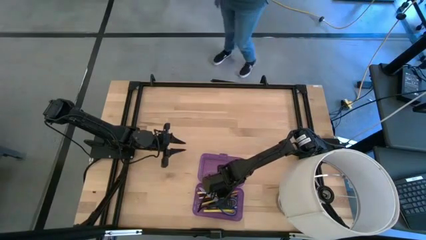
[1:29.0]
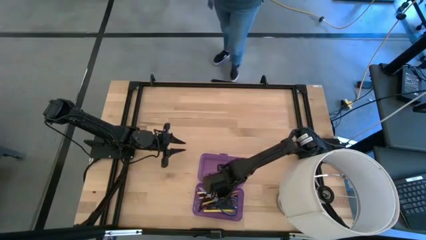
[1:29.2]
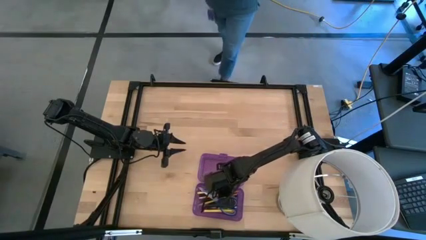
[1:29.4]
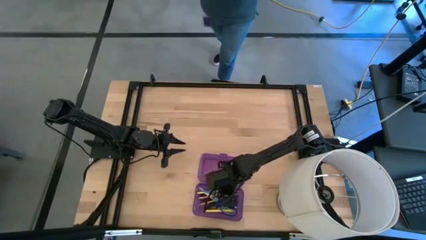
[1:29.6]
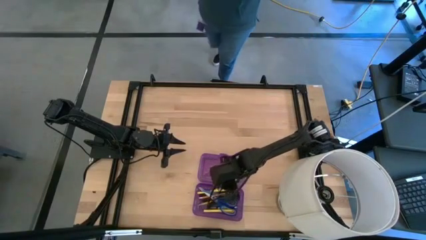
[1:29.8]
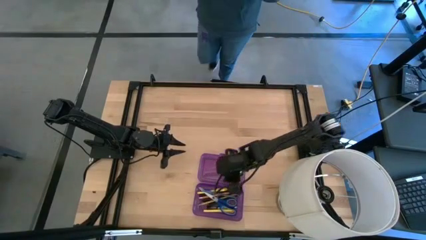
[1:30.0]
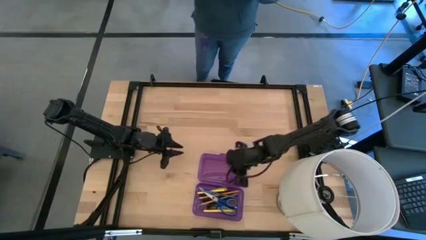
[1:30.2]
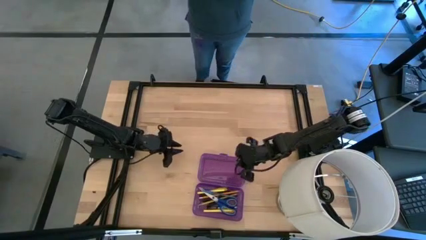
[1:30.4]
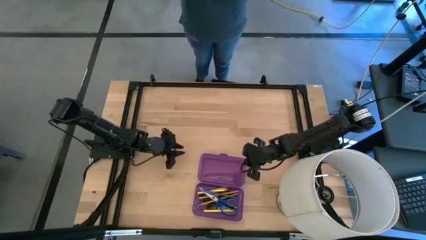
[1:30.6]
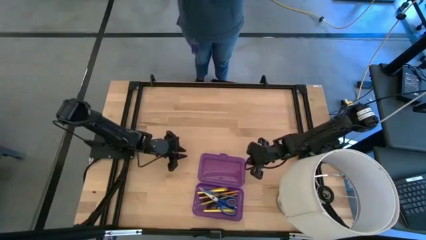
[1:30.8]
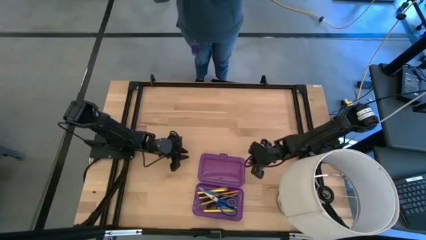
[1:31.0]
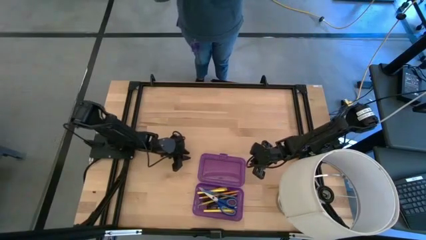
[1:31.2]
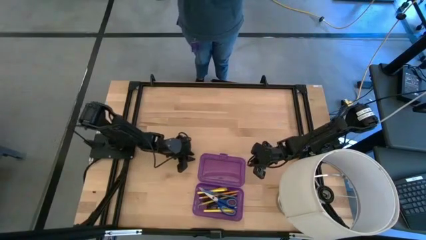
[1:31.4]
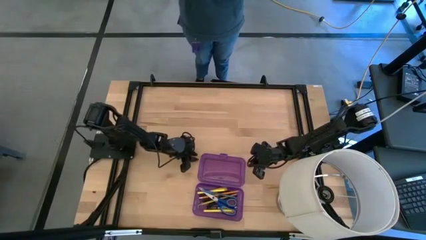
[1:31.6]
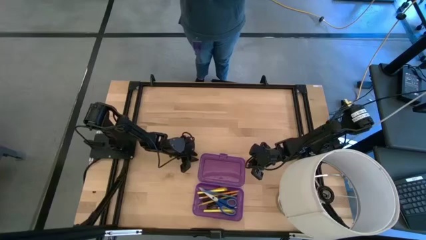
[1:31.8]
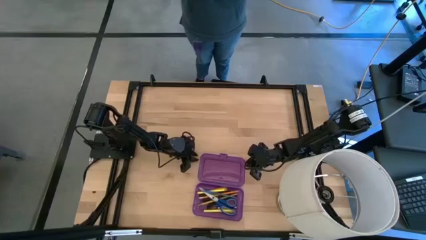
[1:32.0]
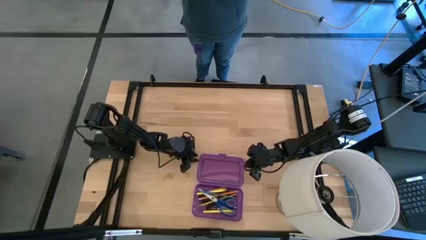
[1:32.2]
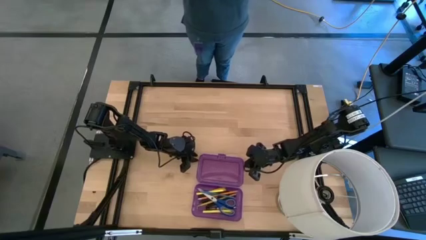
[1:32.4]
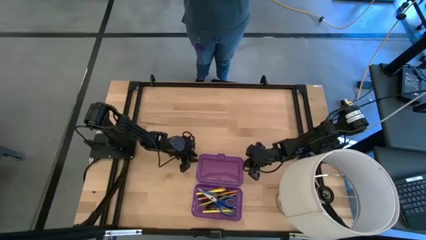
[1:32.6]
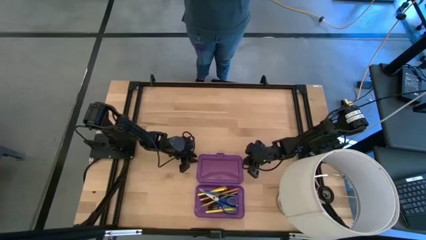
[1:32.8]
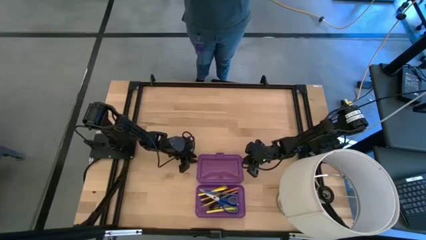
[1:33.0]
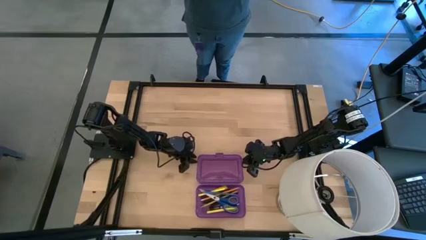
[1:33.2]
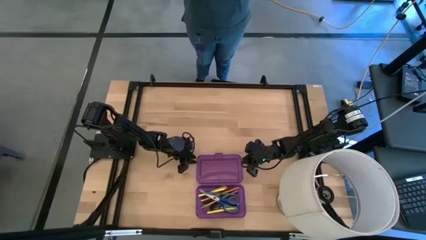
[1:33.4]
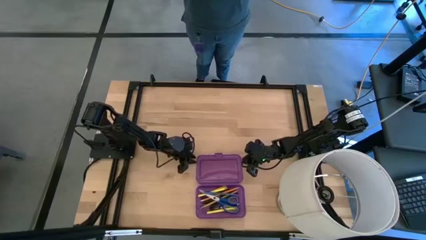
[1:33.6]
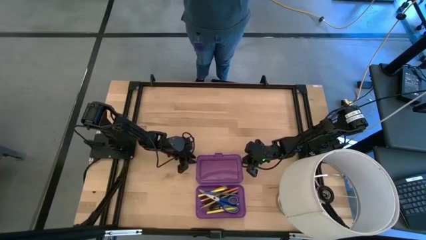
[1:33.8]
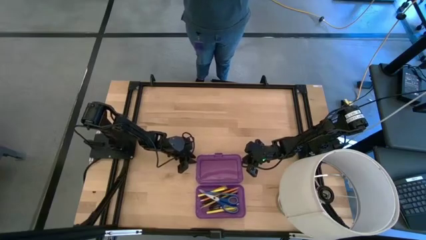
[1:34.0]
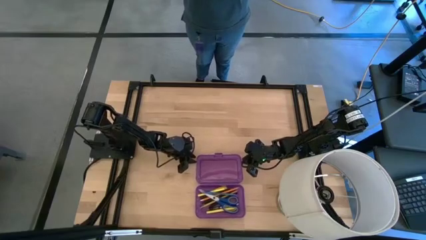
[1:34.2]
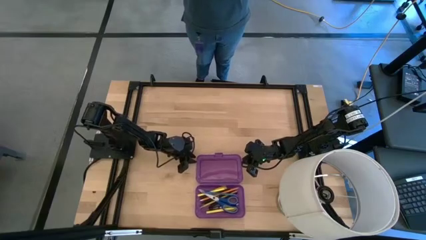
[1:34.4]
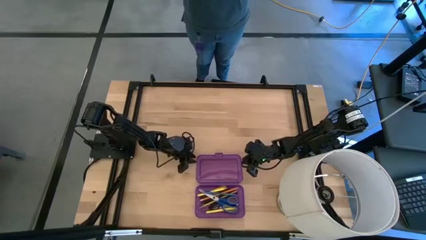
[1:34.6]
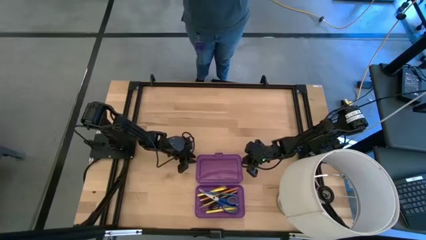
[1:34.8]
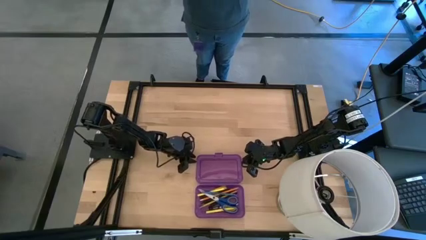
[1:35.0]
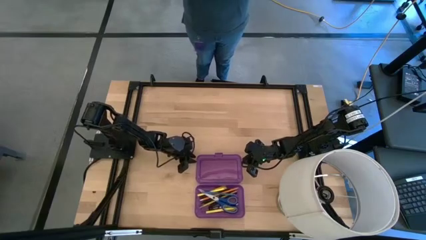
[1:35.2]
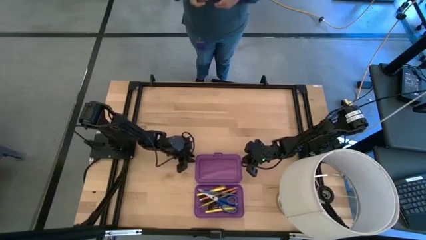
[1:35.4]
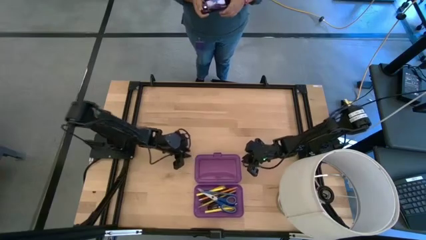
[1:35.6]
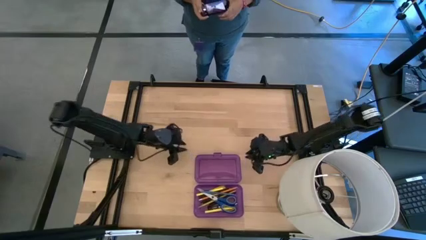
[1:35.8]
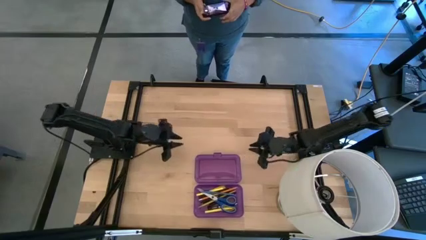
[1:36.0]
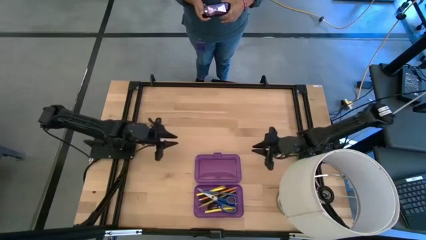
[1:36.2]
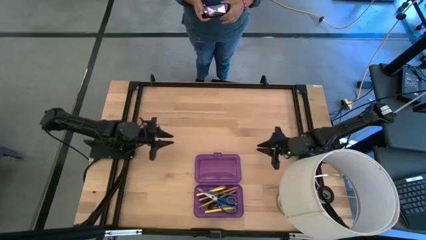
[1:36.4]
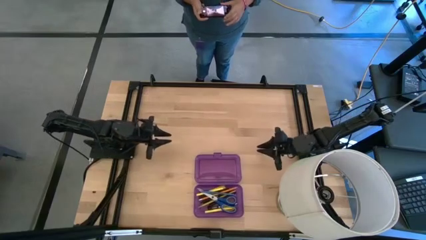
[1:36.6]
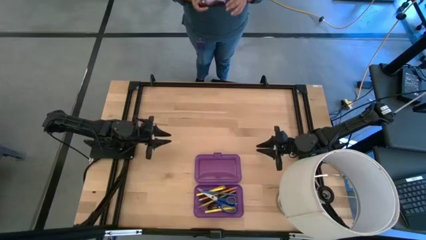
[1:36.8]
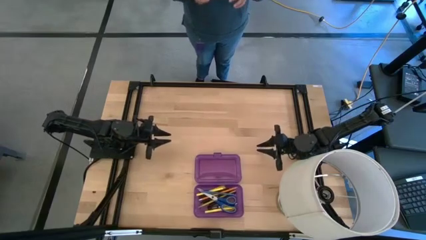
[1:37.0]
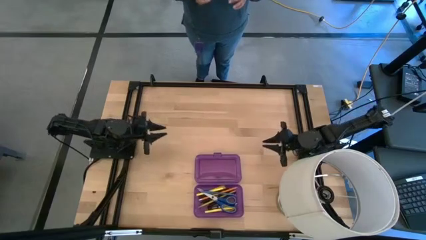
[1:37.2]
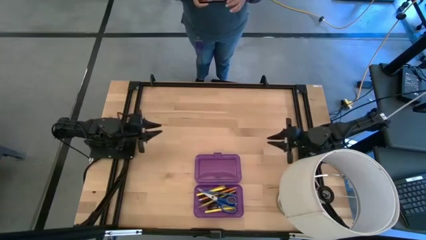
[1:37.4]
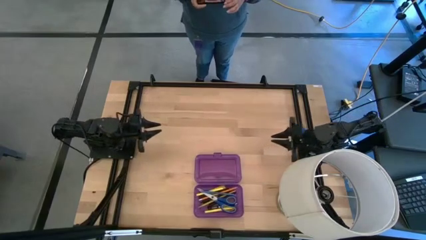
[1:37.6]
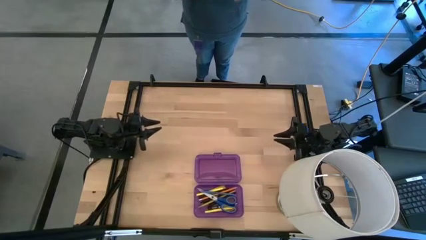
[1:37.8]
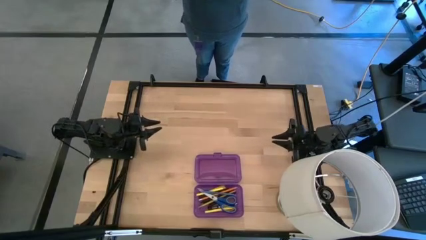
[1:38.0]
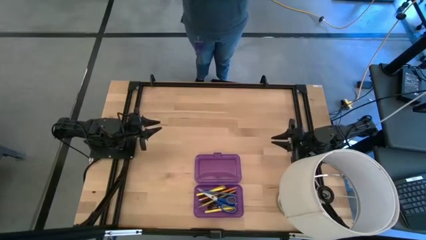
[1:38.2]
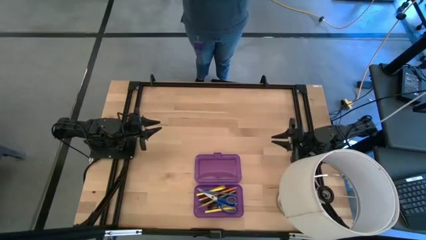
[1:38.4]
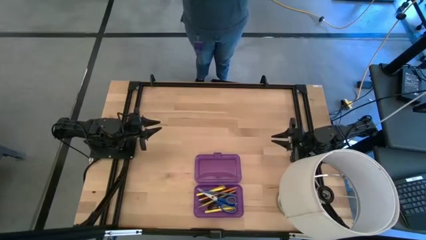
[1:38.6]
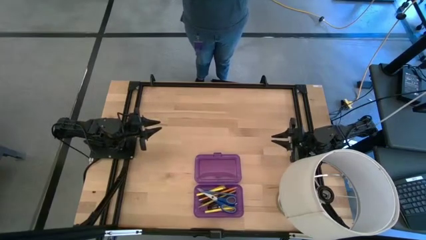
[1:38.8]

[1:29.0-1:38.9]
Task: Pick & place school supplies into a supply box
Close the violet supply box

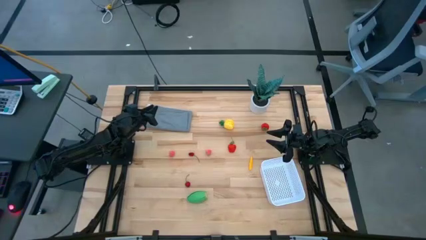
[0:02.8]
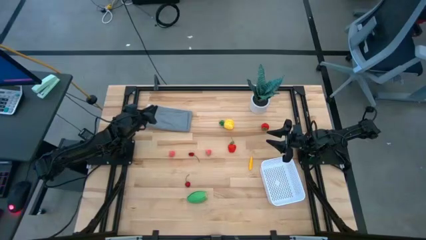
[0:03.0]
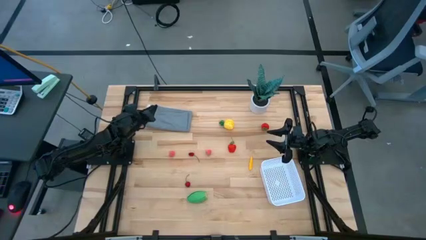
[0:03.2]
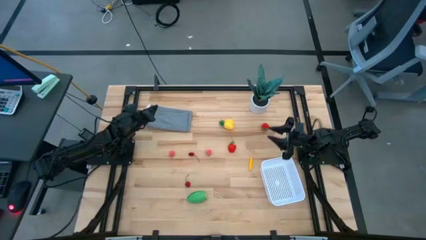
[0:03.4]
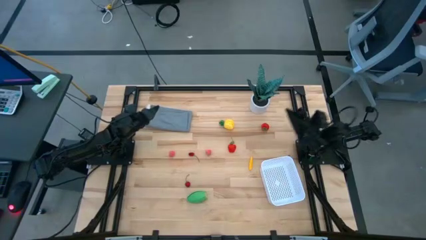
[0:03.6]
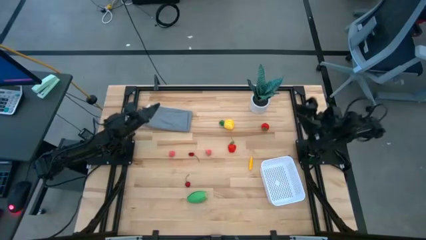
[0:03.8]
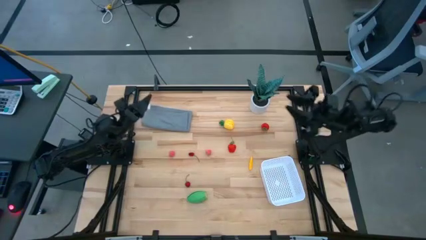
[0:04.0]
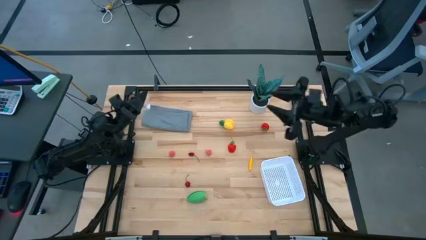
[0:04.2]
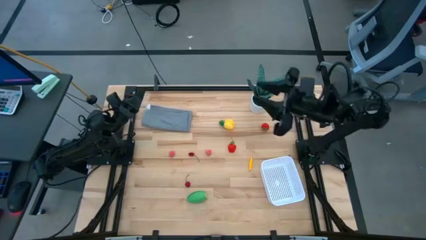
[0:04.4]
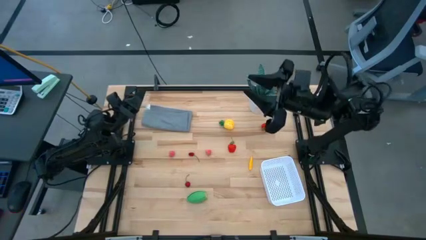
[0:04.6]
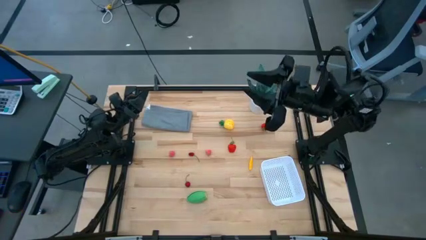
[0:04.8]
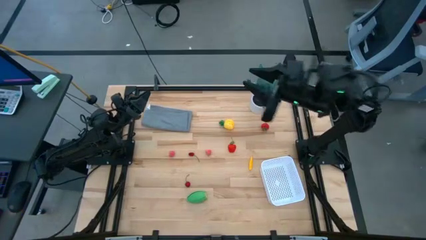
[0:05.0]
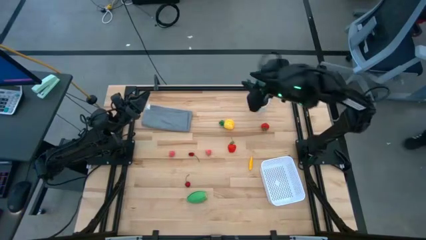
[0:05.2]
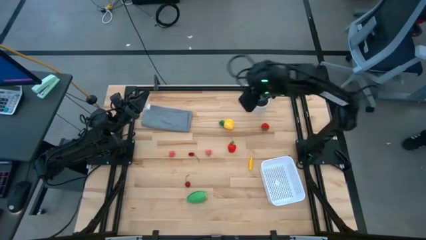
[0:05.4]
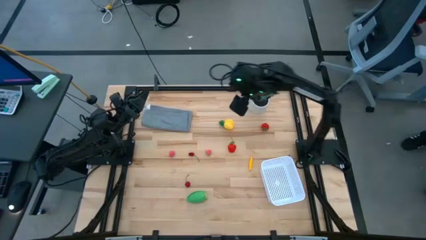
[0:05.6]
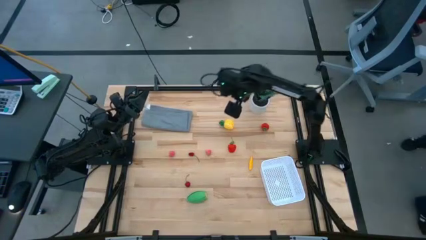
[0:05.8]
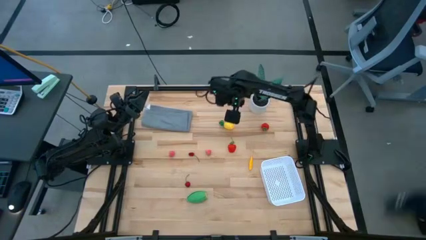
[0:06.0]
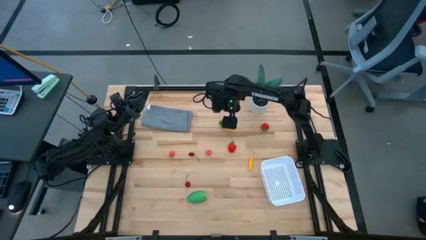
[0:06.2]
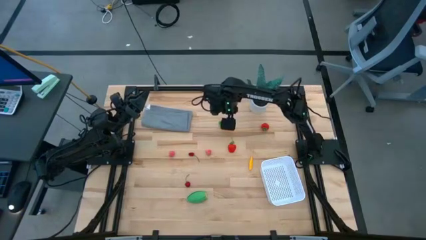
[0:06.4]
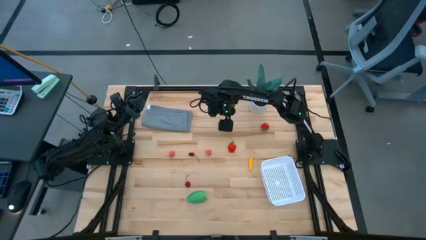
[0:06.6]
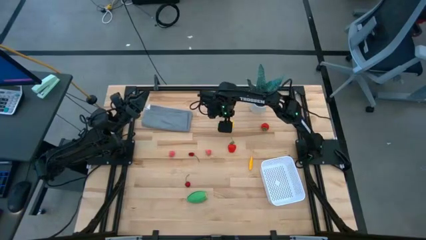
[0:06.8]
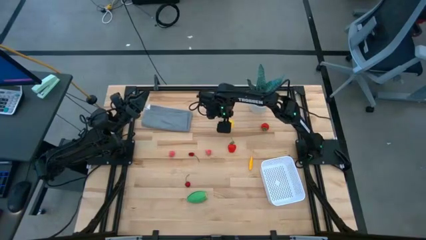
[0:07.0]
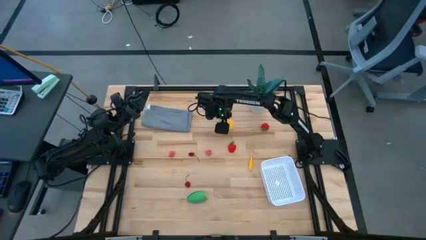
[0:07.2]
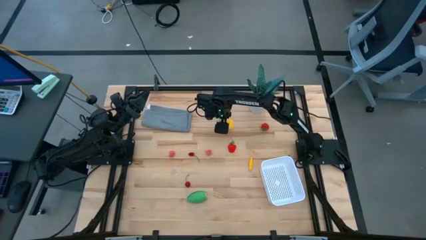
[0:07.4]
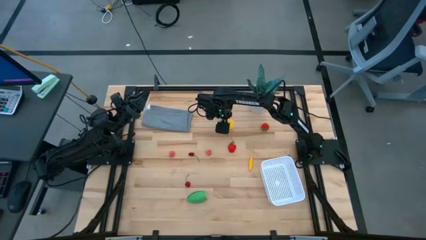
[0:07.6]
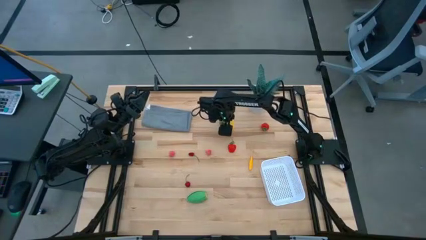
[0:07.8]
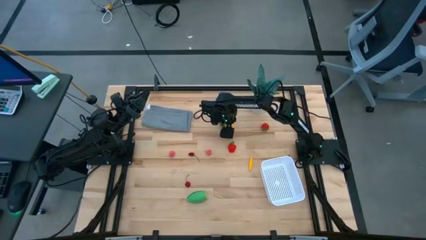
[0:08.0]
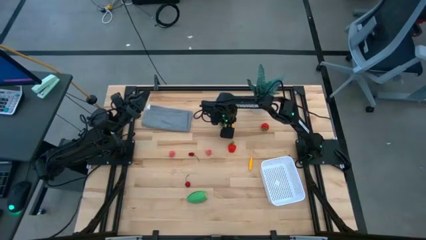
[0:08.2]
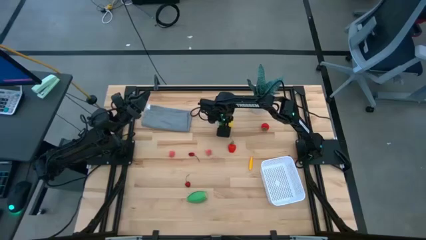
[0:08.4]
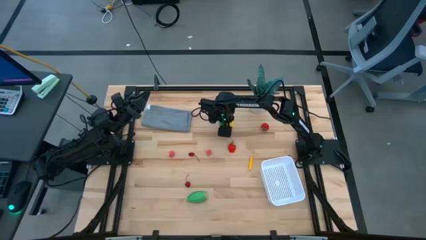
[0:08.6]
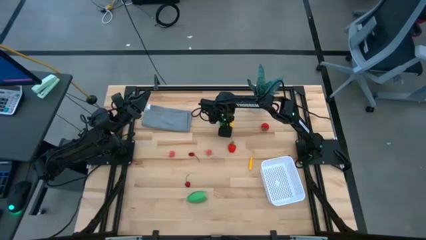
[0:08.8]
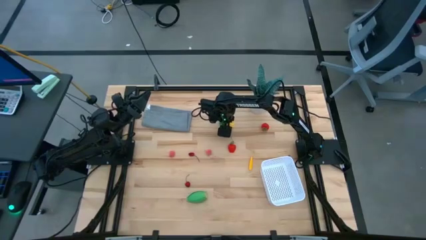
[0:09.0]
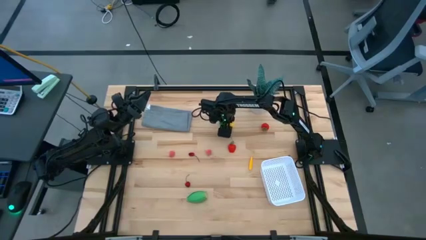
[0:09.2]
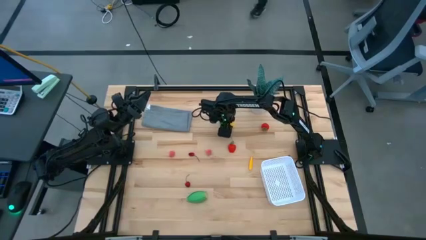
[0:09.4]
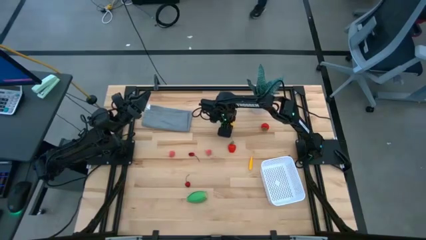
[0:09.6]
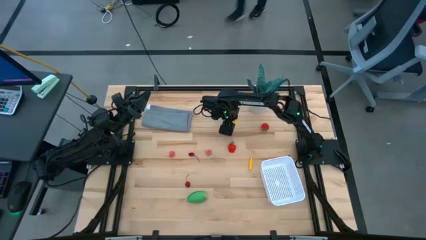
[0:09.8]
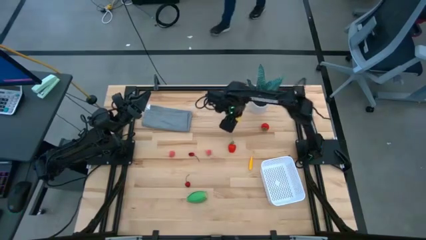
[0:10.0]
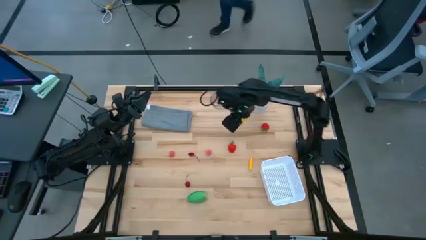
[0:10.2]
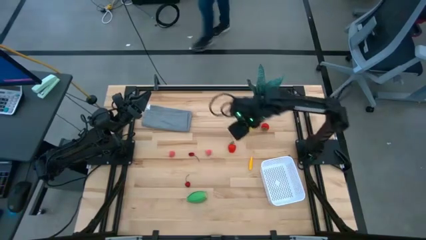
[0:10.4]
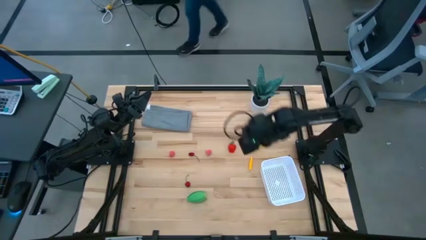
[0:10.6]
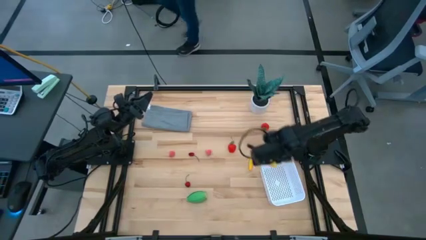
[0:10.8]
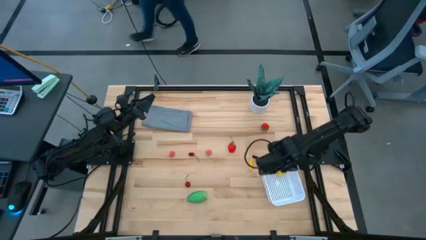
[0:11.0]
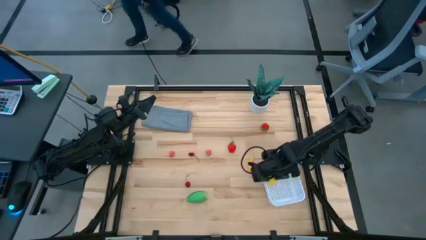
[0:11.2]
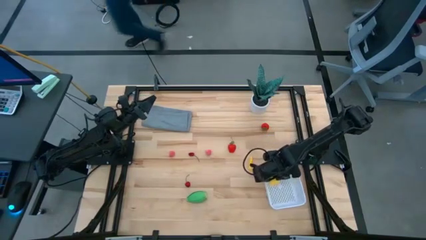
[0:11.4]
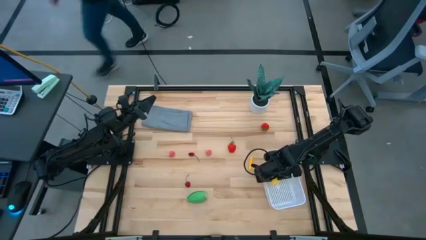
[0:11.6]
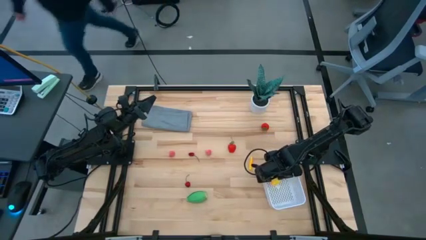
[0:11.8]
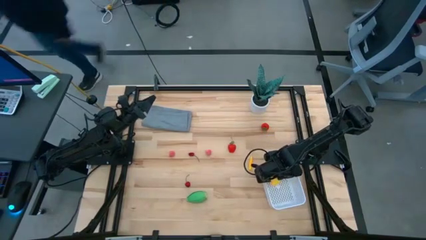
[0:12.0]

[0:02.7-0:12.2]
Task: Pick and placing Produce into tupperware
Put the pineapple into the white bin
